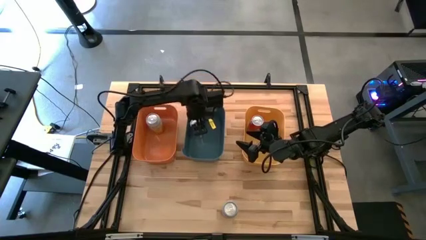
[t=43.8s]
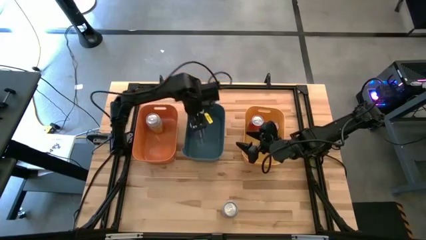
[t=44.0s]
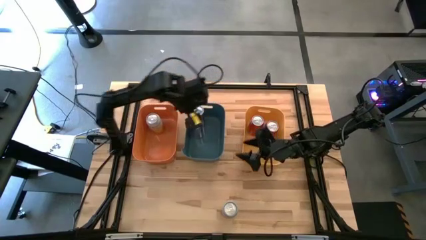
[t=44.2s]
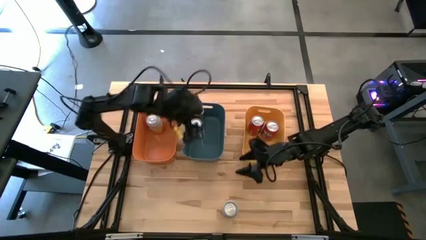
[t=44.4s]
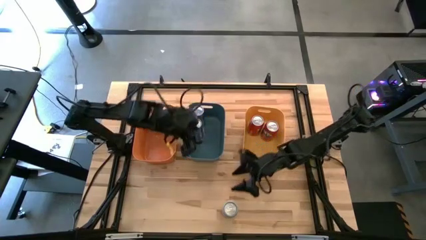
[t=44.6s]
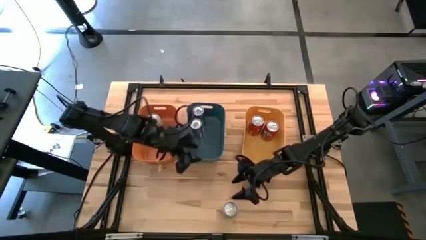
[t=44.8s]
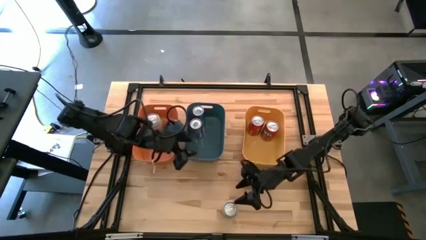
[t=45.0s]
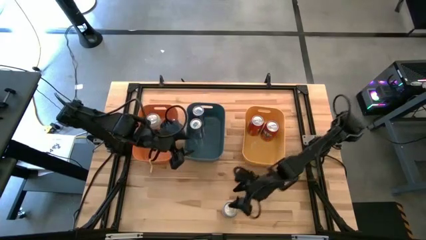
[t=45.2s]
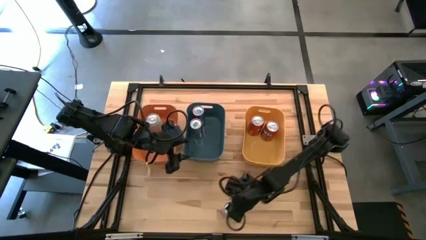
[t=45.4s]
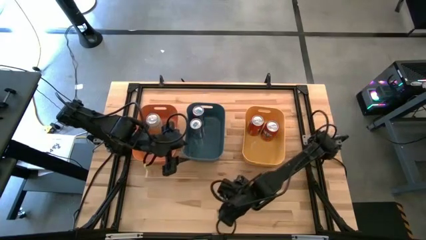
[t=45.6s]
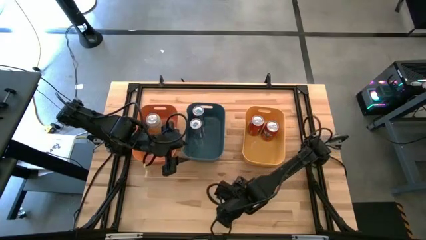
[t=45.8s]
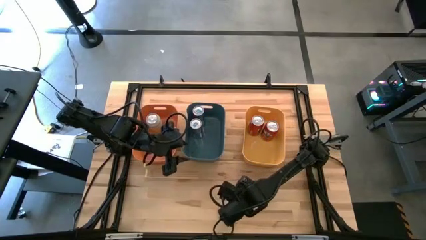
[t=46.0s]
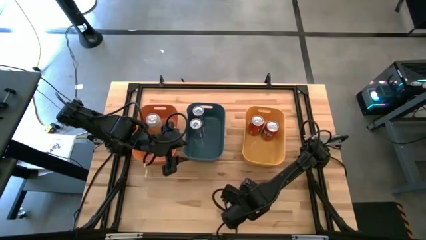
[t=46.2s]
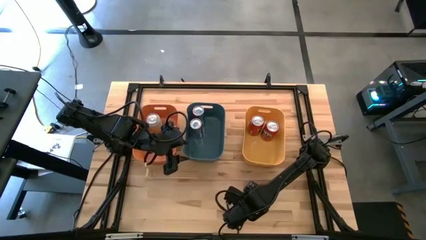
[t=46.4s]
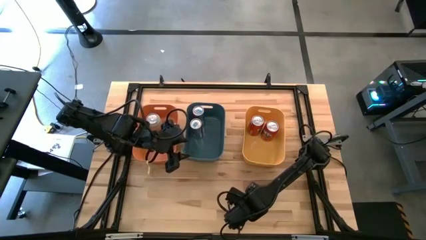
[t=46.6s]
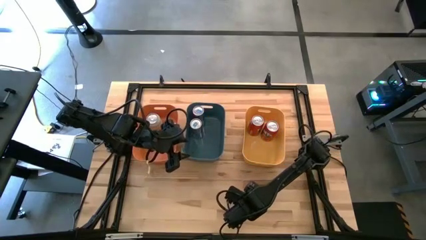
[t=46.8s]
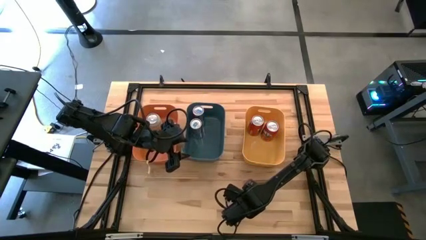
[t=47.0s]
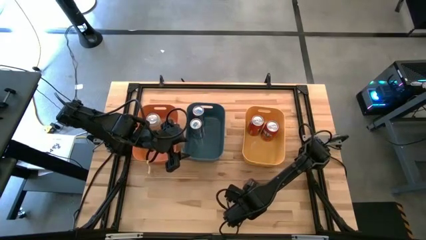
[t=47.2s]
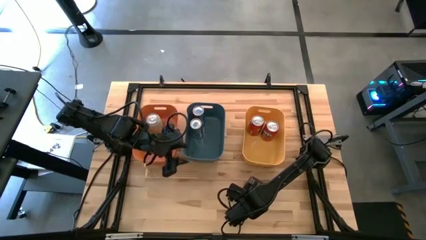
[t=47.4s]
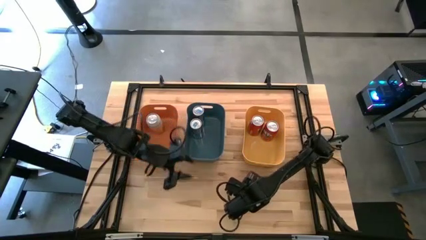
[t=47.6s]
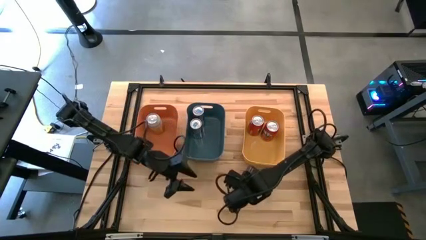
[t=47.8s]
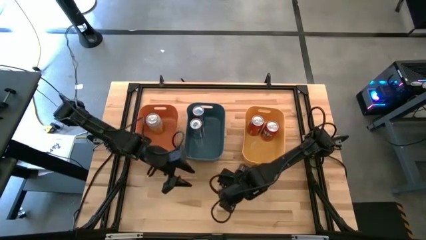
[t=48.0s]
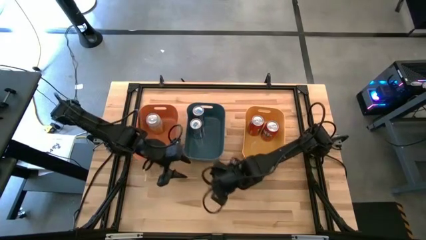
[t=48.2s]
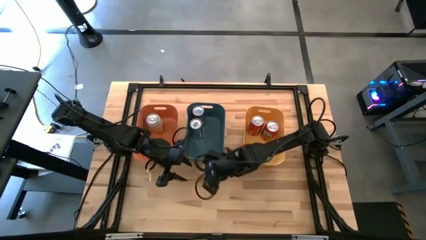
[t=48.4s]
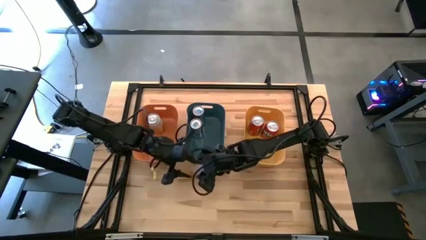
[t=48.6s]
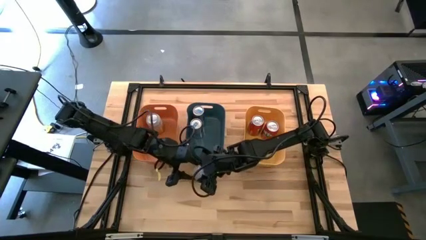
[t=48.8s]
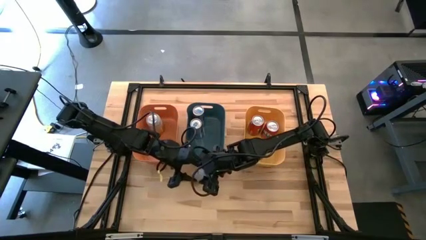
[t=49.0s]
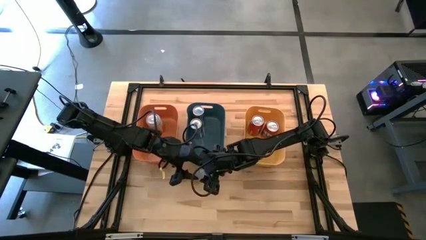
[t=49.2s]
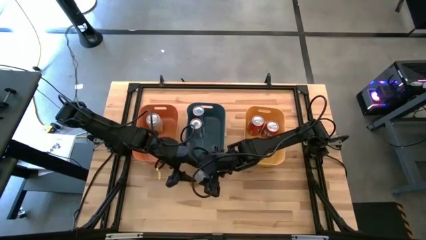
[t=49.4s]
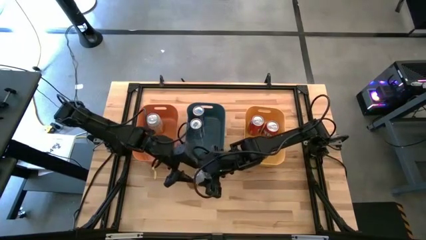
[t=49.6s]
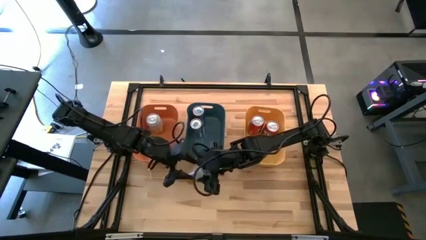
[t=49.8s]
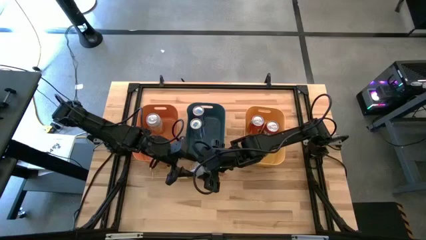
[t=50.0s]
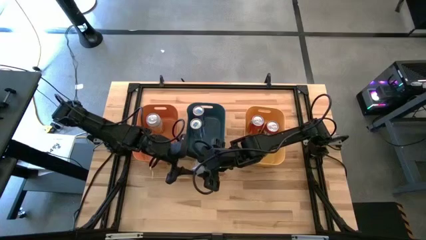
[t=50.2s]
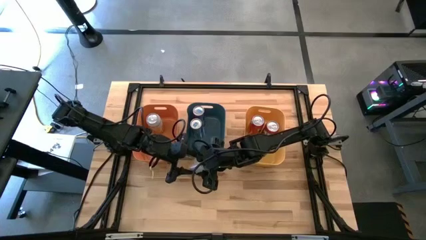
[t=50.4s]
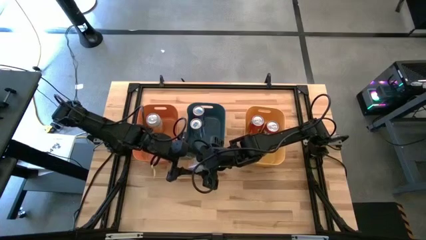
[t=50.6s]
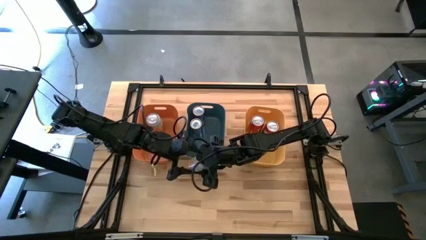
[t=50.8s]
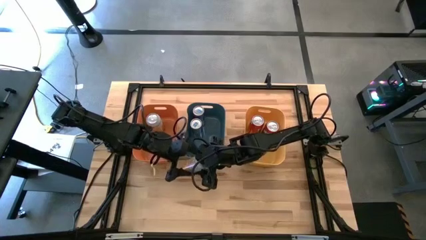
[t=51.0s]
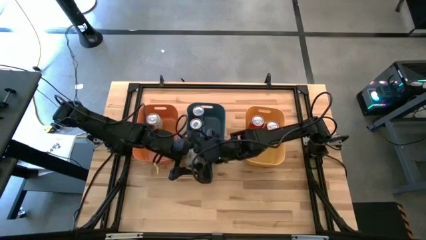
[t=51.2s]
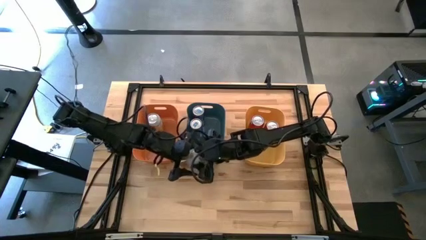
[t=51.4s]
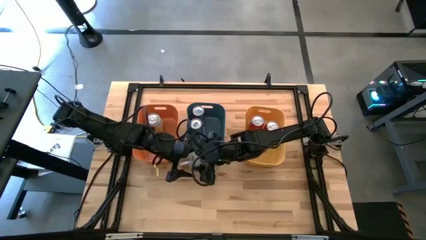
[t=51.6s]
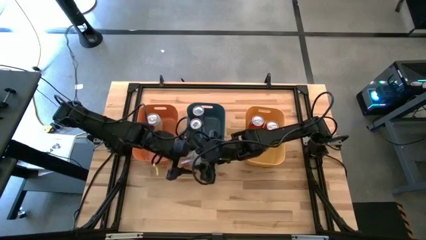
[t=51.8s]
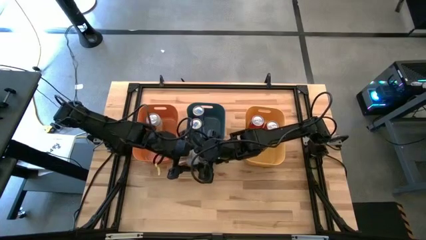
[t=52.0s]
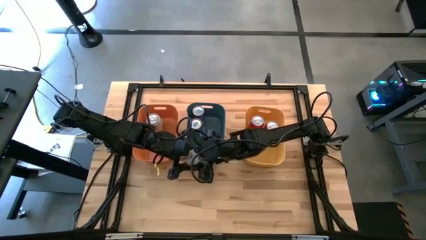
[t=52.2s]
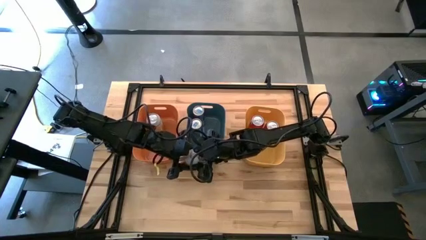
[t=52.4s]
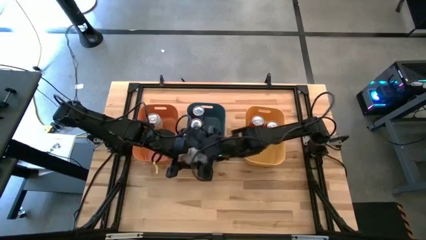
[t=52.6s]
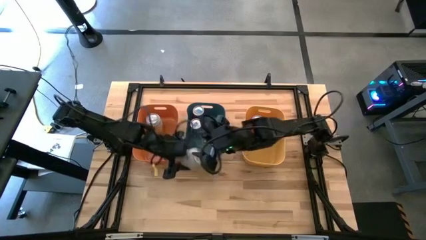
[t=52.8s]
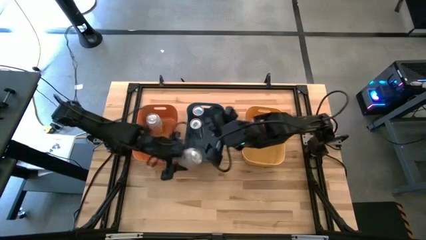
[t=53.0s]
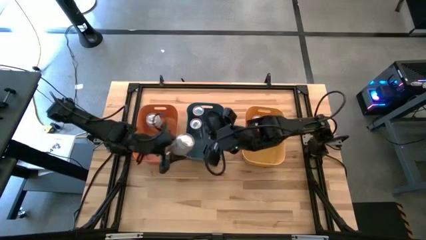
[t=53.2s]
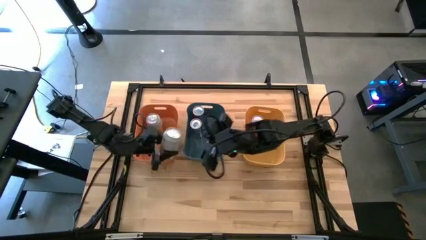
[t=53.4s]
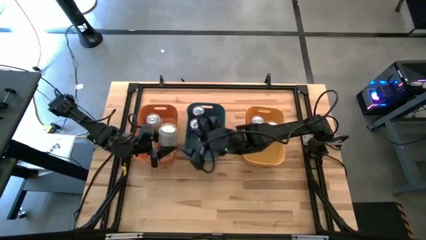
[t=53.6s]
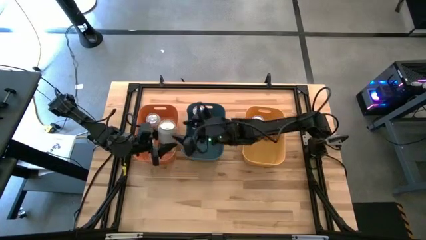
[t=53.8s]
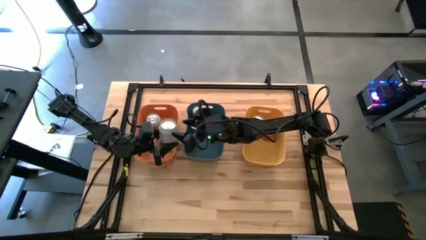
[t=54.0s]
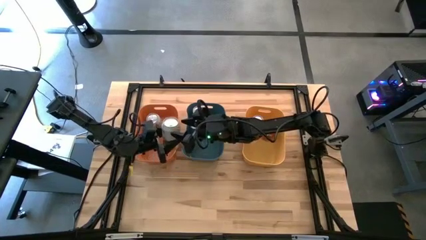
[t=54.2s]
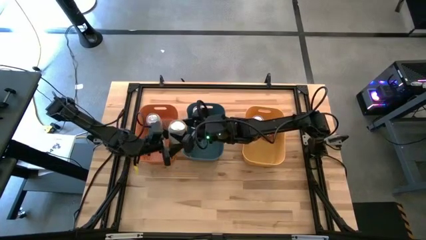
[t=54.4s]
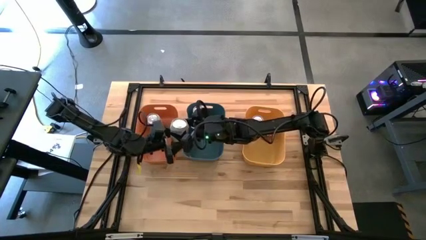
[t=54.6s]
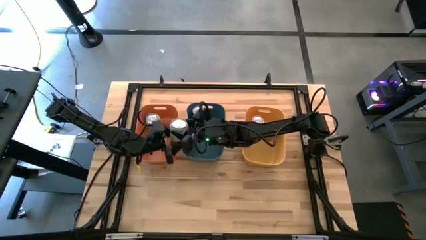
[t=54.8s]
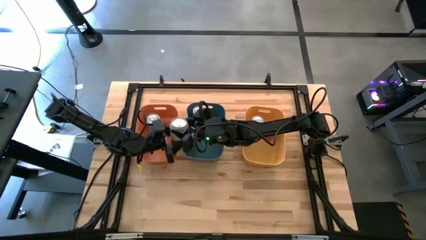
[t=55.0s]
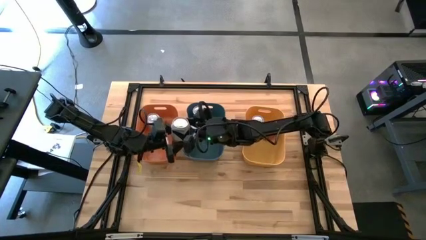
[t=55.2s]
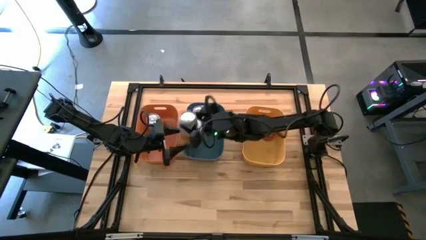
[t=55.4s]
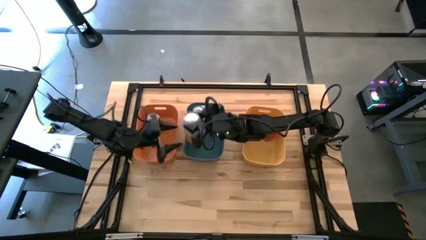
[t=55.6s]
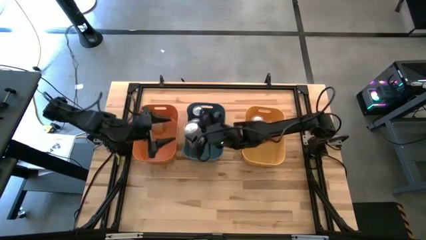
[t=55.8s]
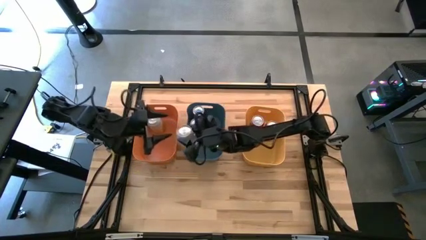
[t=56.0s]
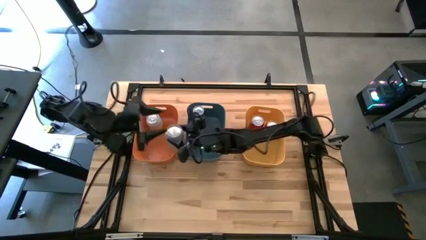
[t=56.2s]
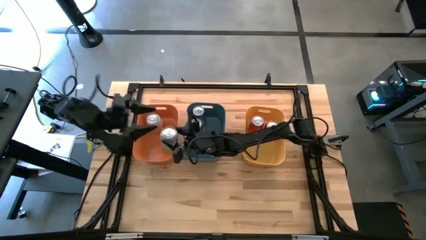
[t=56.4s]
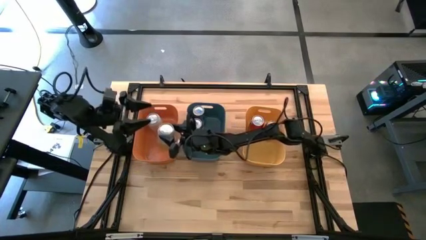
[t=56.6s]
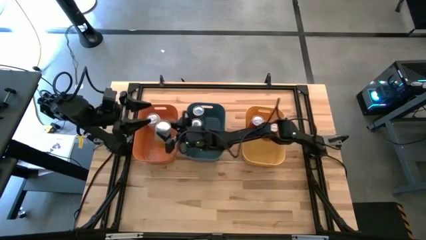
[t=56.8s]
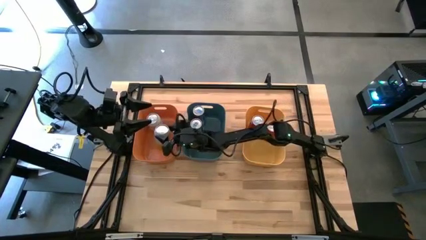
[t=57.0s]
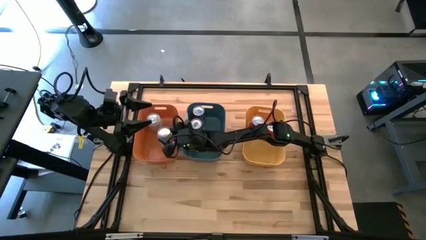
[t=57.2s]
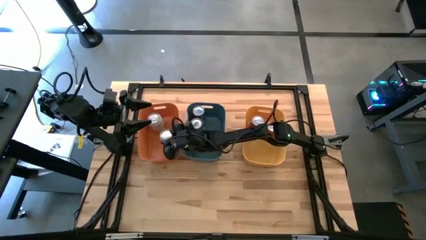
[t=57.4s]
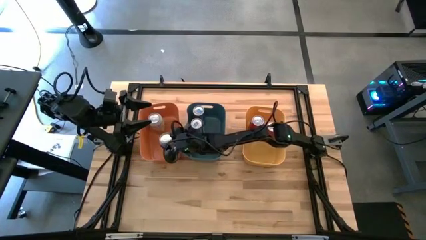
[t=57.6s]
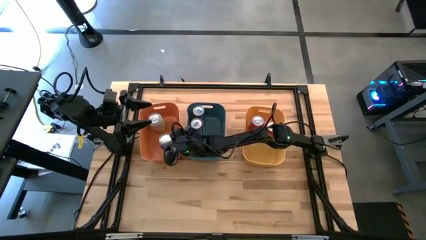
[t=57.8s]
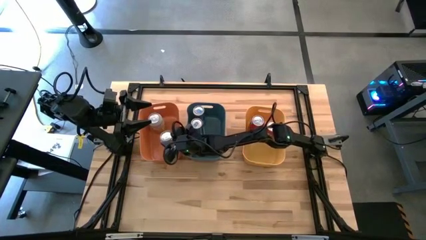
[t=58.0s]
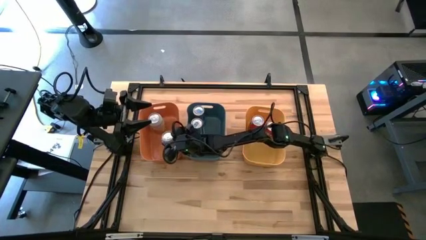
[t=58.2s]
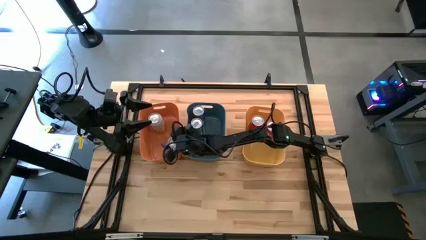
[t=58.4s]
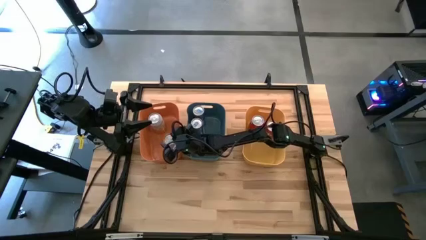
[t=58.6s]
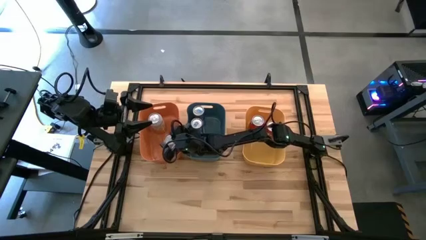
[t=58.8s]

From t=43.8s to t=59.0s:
Task: Sort soda cans
Put the yellow-white soda can into the orange bin
